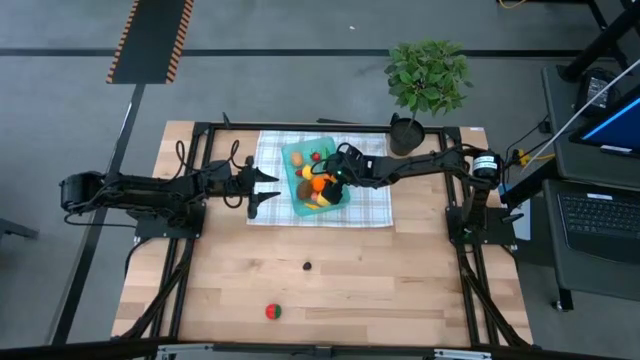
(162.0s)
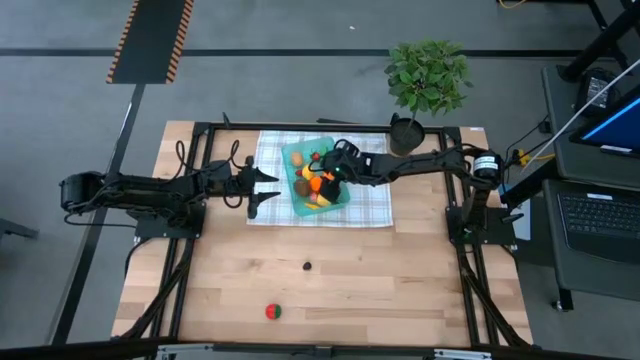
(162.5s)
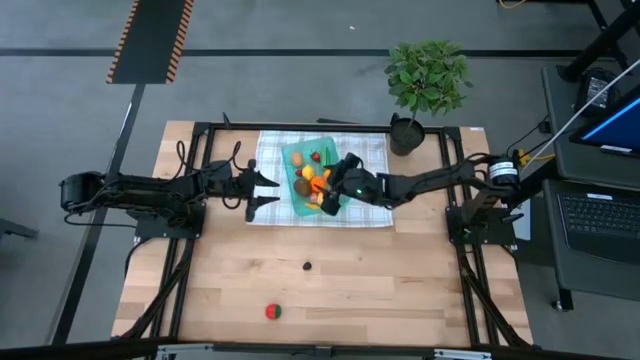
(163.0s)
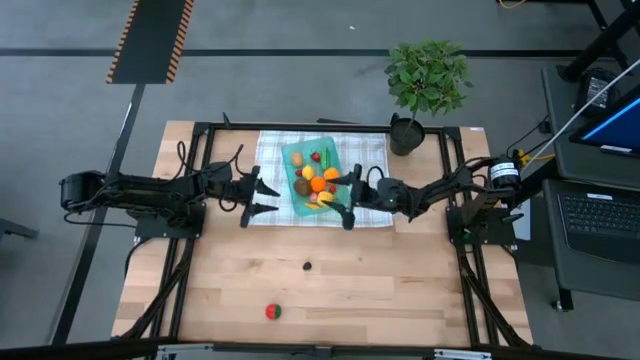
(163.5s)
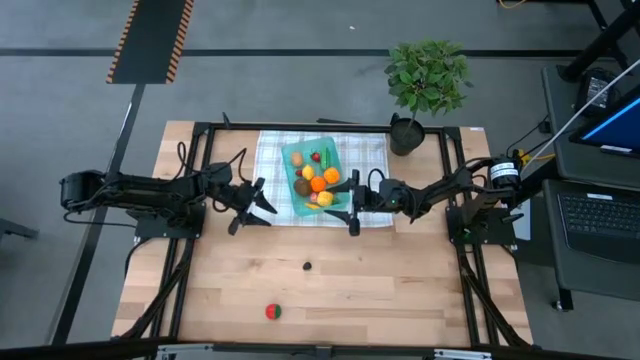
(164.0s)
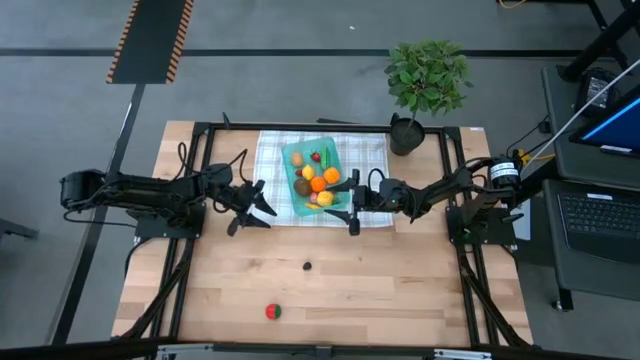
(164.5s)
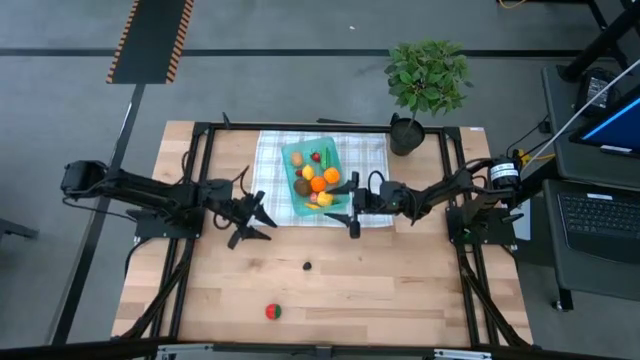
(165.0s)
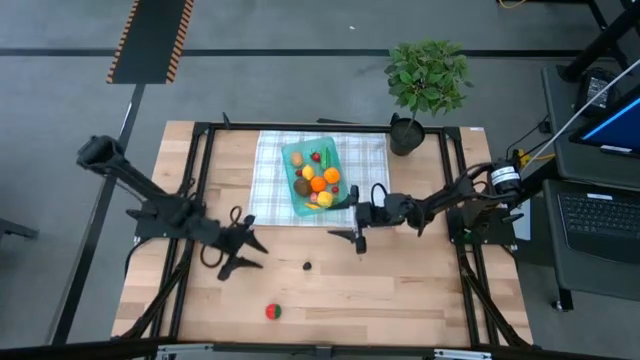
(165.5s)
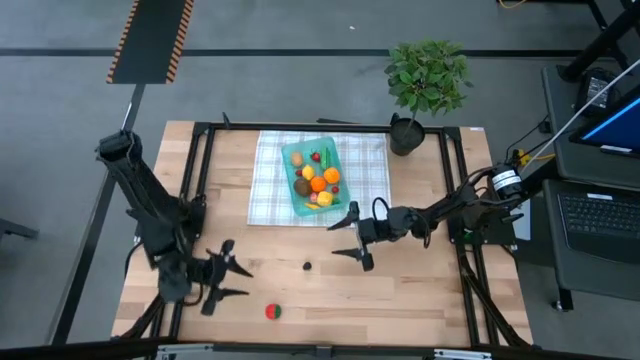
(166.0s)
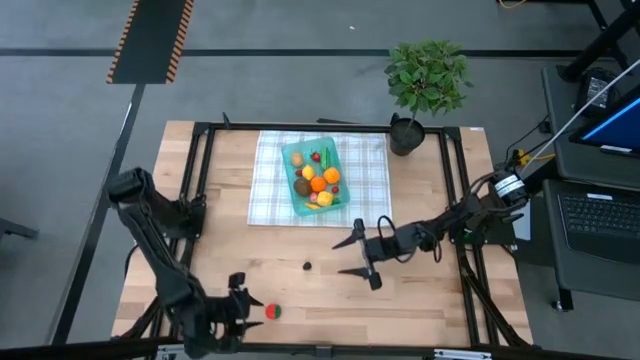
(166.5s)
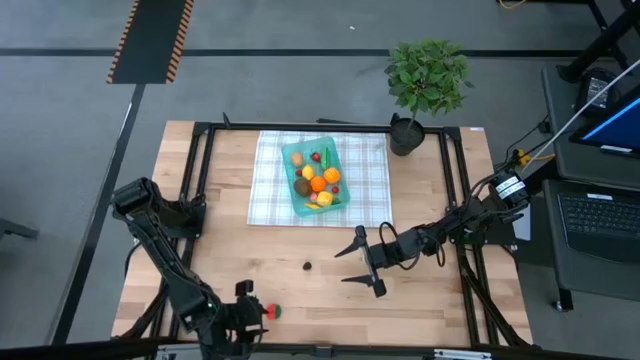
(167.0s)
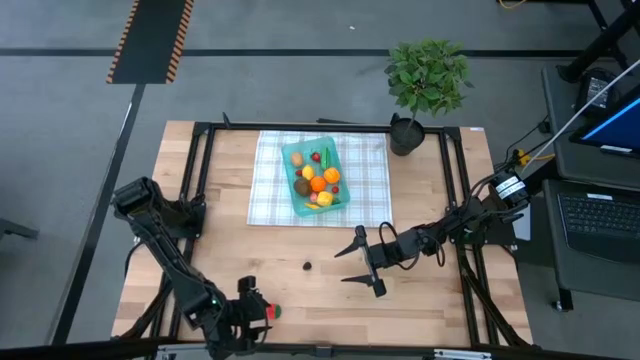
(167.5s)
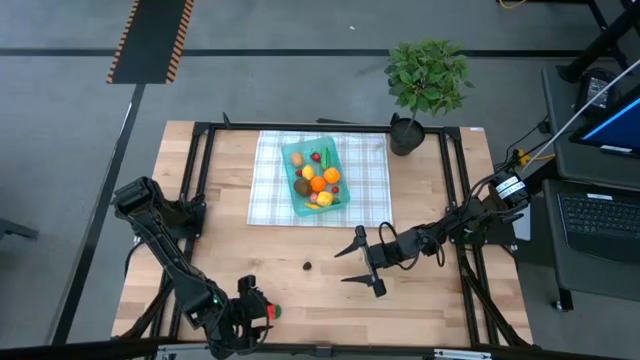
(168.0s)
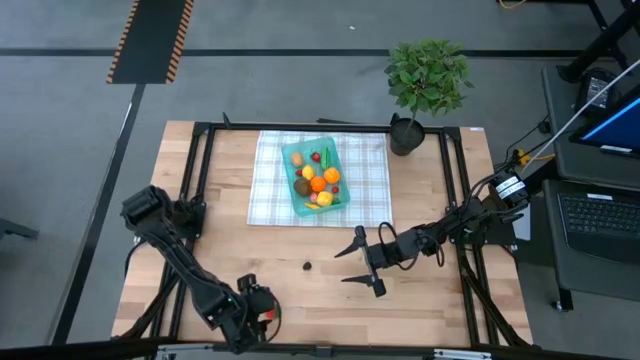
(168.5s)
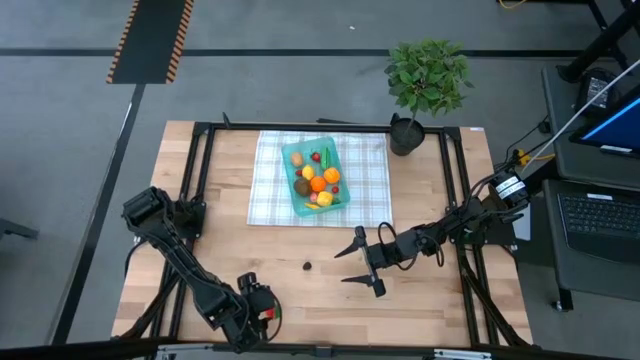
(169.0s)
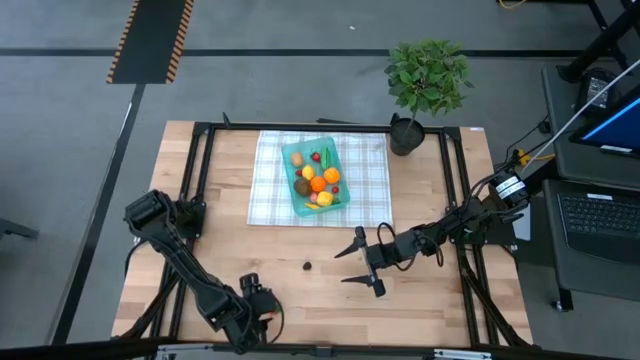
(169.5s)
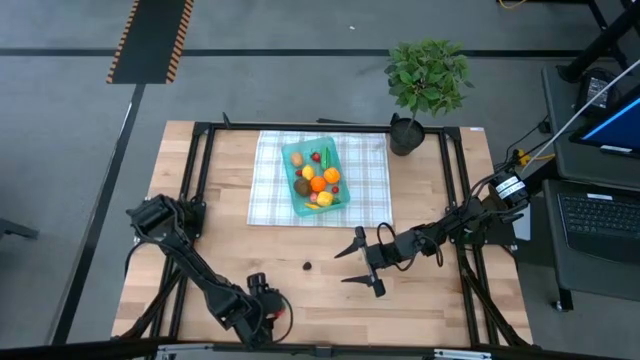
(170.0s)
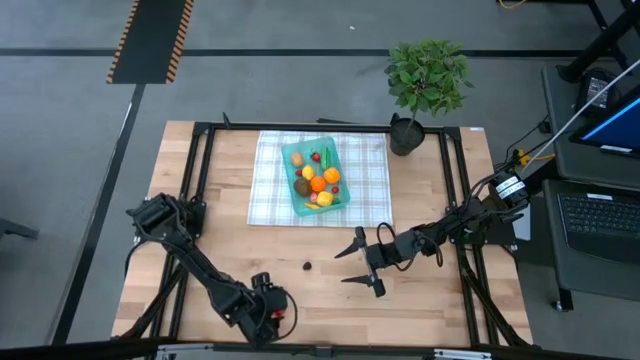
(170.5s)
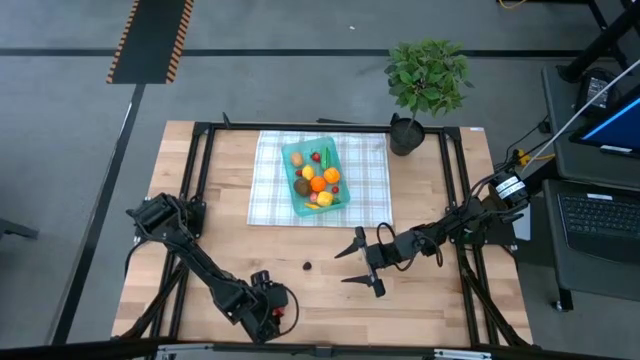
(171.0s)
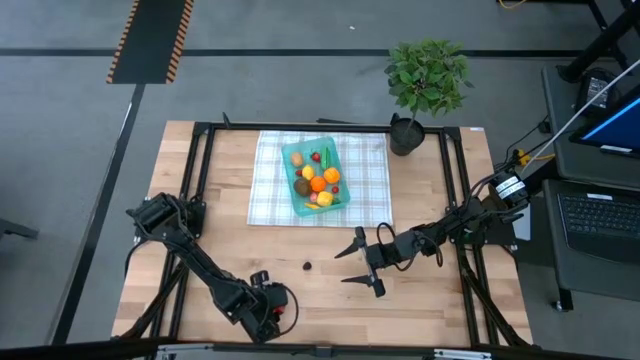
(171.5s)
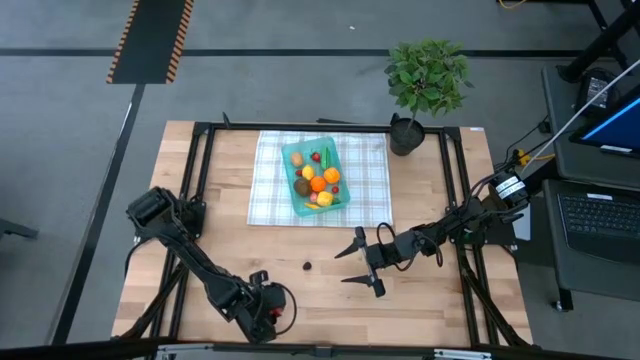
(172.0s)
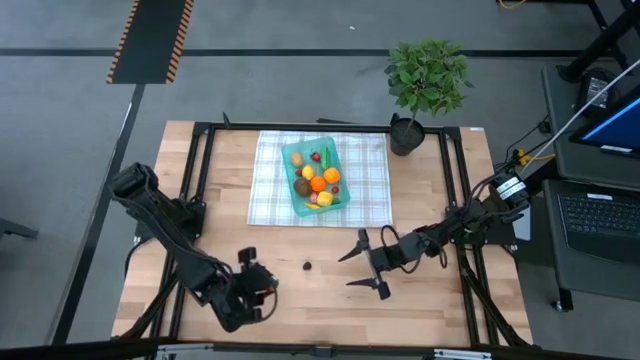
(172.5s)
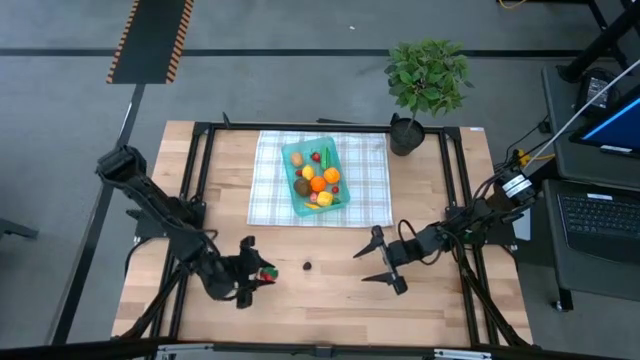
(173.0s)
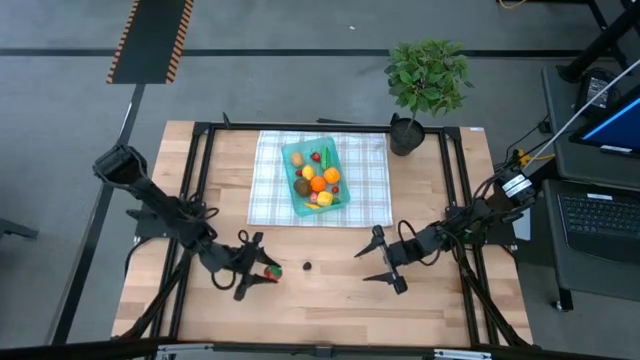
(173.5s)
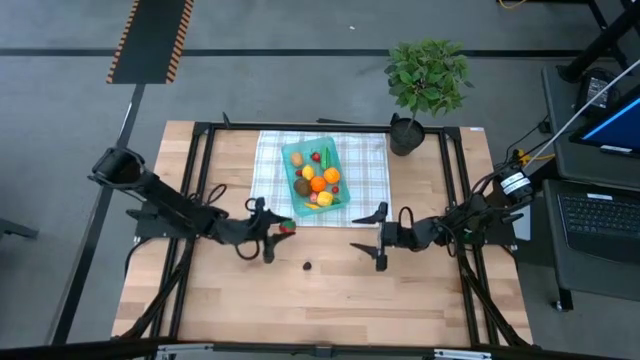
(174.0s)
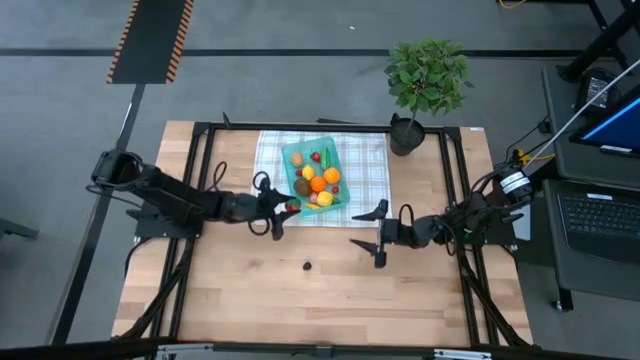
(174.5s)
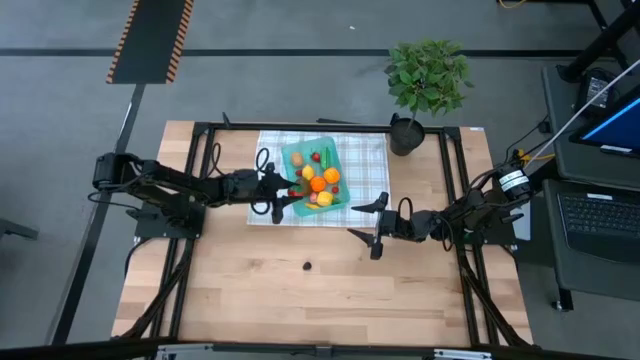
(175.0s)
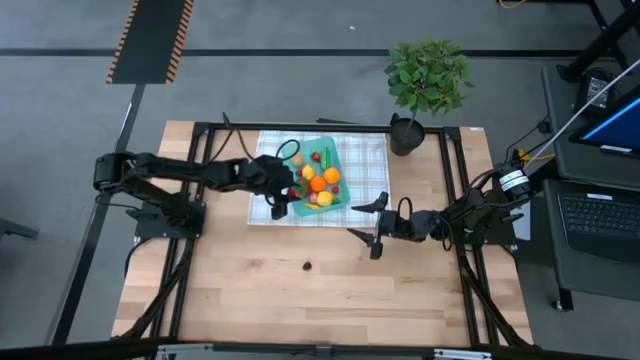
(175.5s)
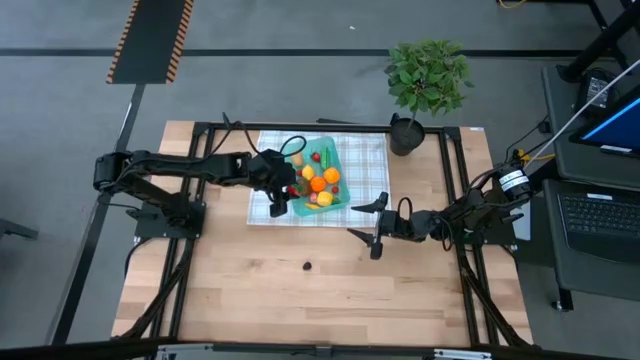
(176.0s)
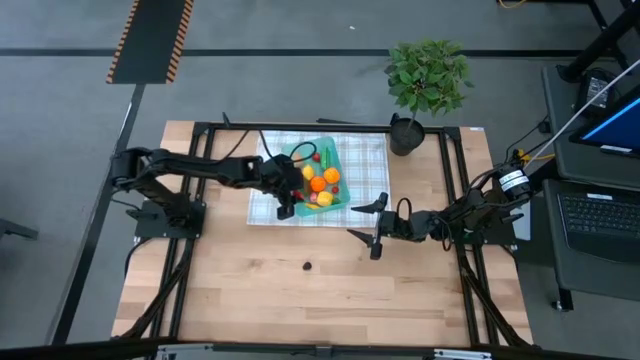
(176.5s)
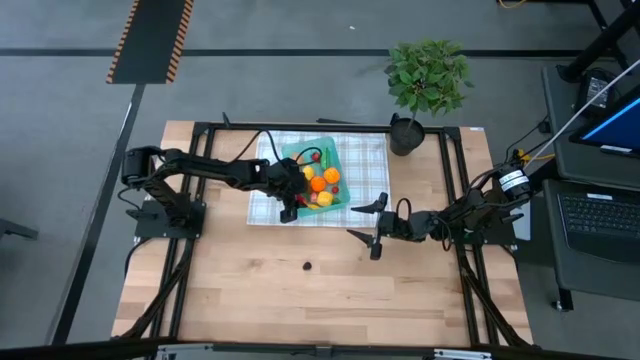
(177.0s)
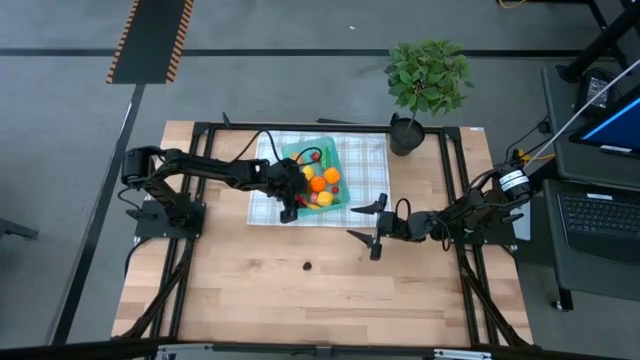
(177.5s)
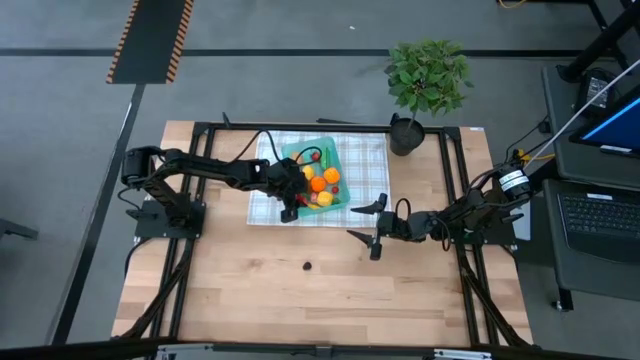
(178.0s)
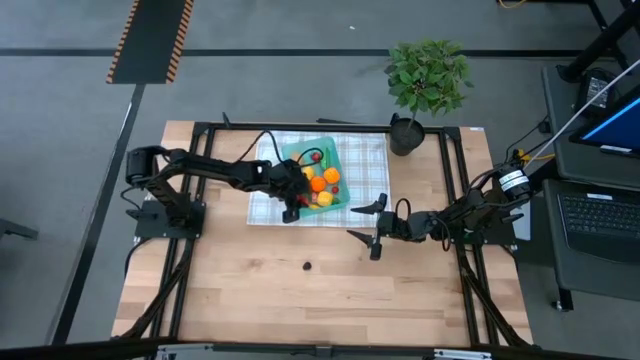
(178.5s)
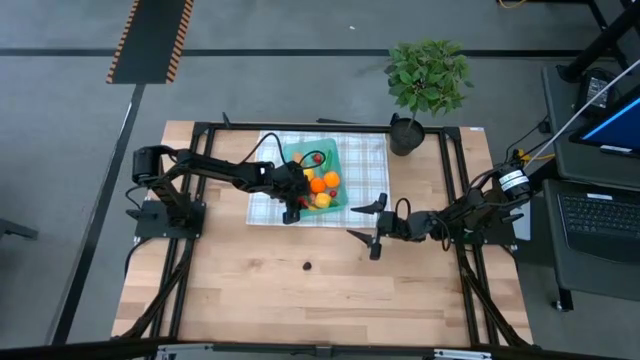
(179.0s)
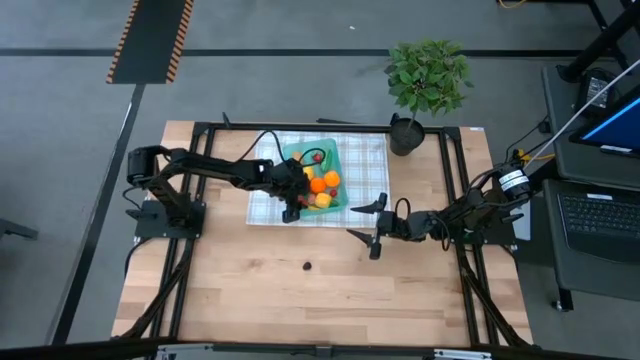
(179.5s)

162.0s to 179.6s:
Task: Pick and placing Produce into tupperware
Put the red strawberry into the blue bin

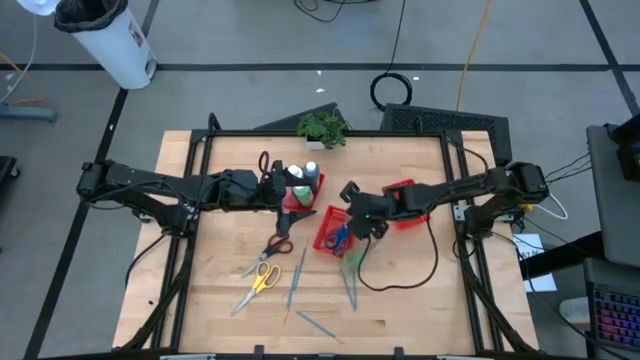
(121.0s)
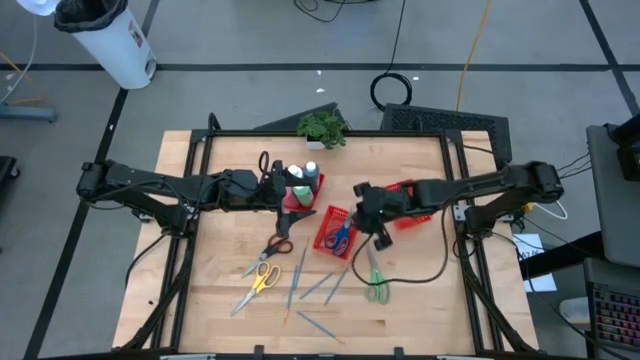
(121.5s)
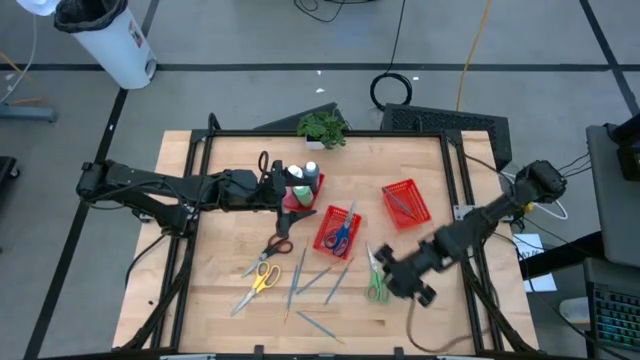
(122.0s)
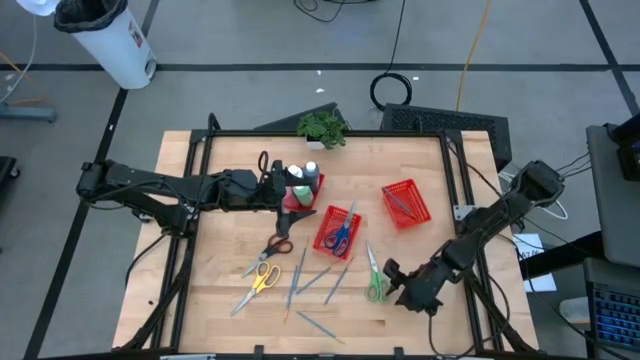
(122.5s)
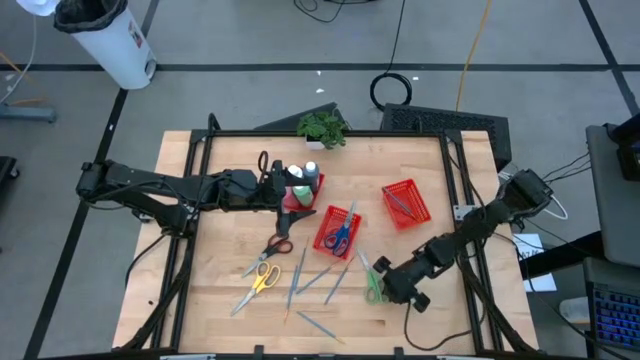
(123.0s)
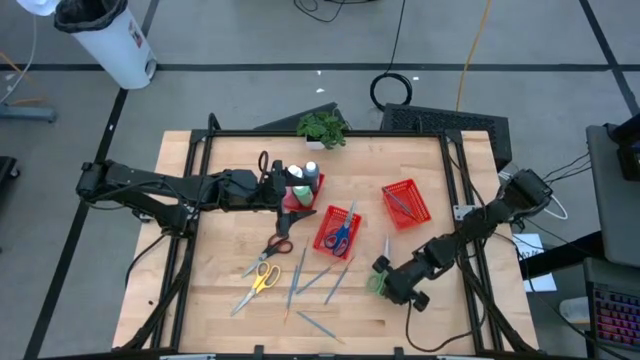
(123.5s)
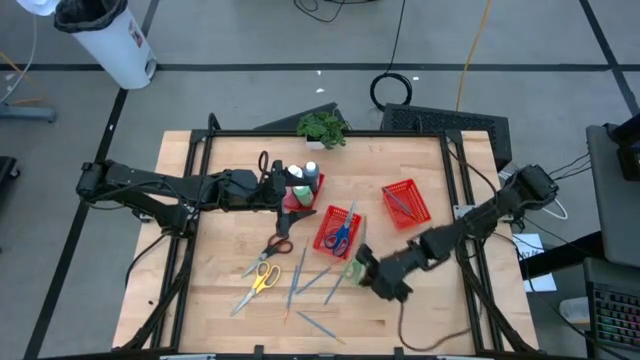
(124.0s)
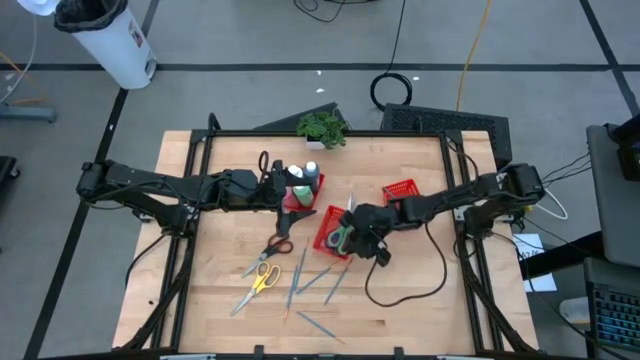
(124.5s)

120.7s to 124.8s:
Task: Pick & Place Paint Supplies
Put the green scissors into the middle red bin

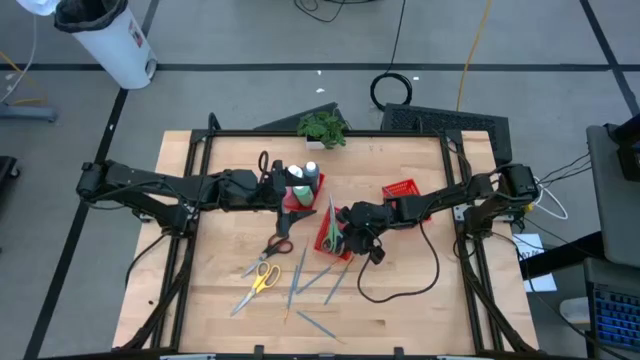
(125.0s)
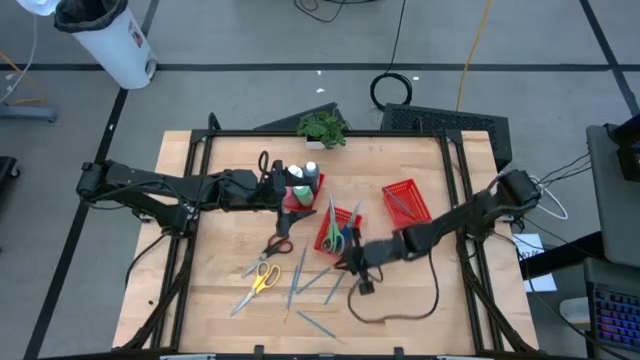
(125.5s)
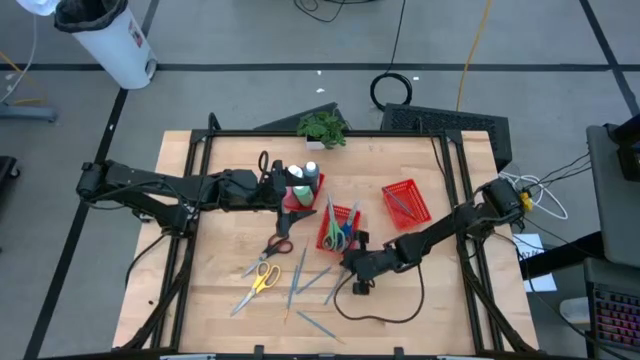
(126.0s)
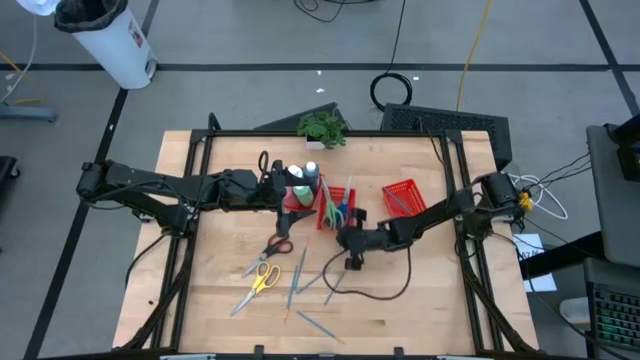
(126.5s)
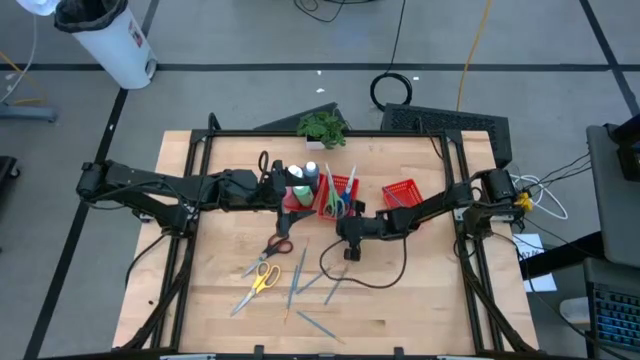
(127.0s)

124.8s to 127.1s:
Adjust the middle red bin on the table
